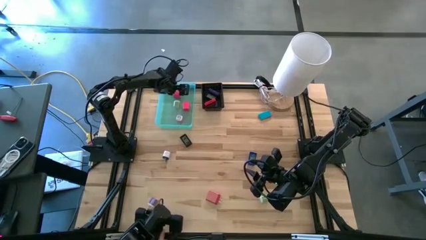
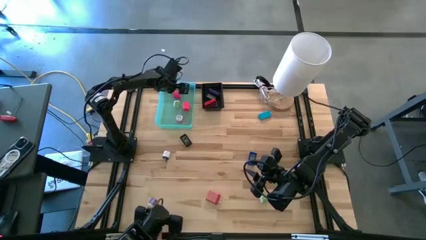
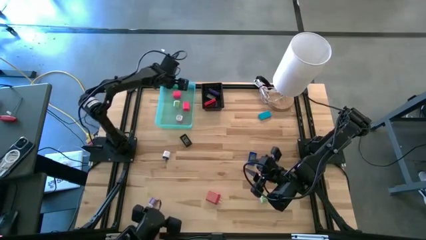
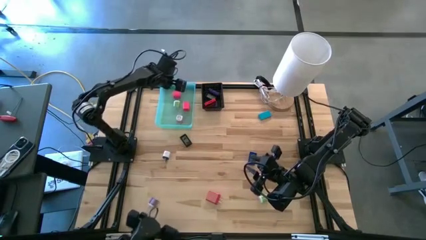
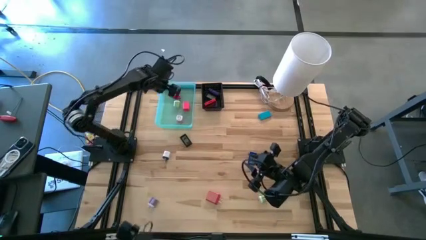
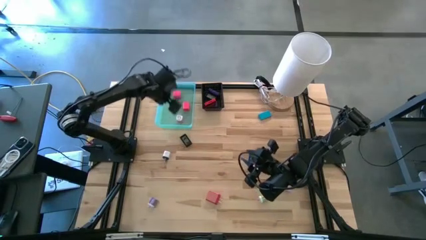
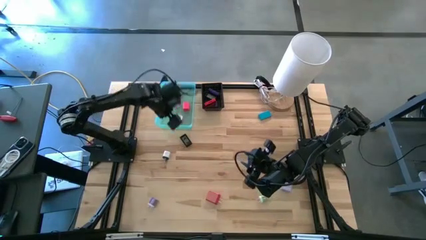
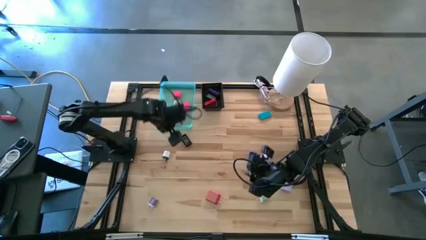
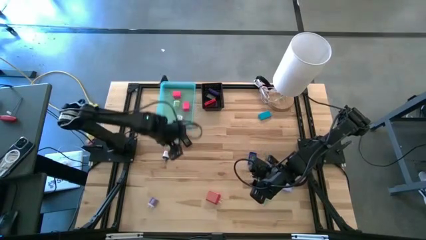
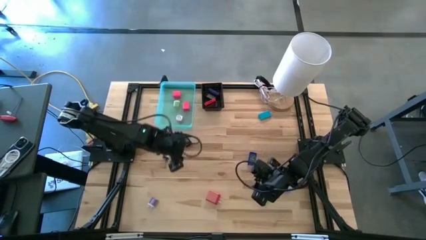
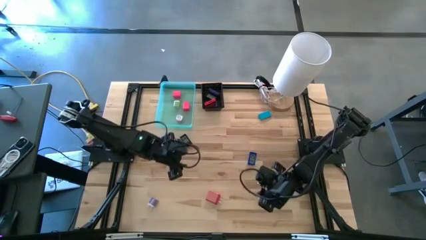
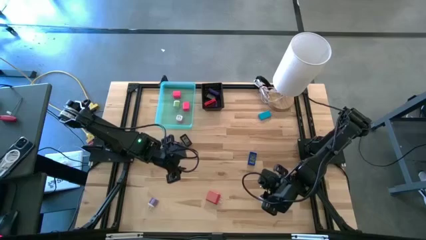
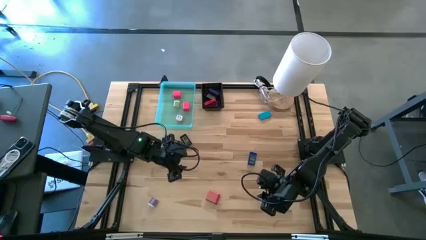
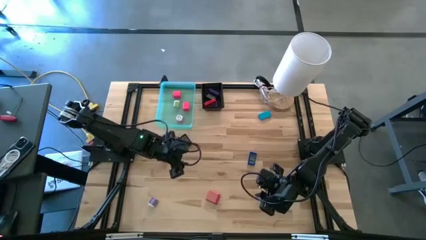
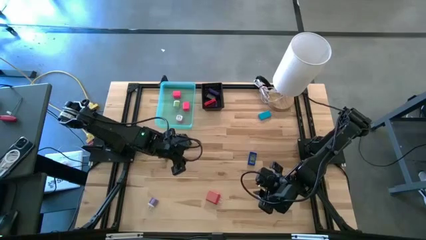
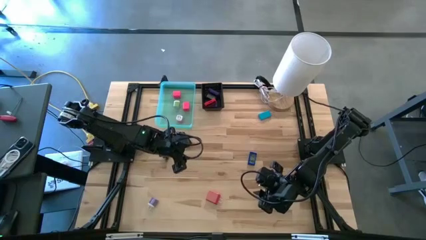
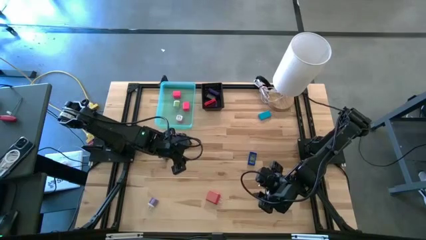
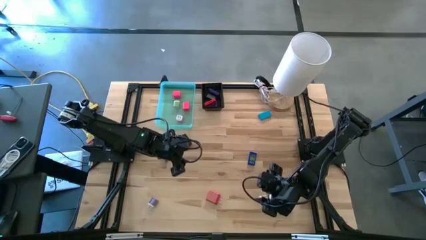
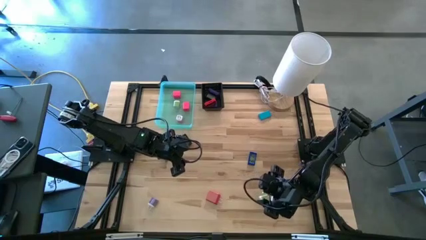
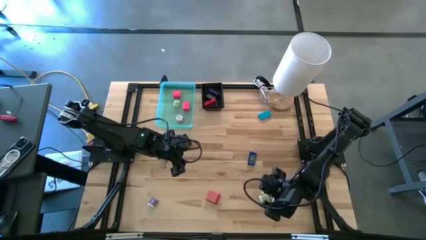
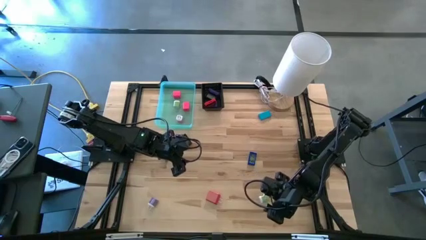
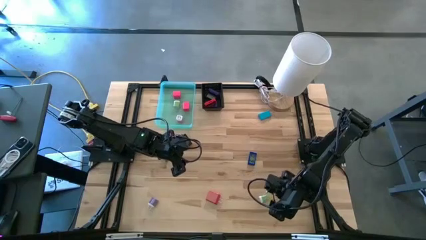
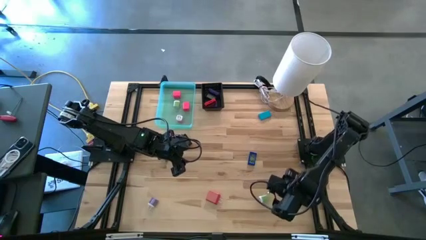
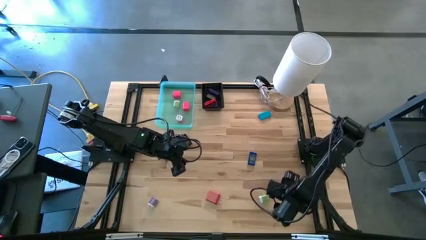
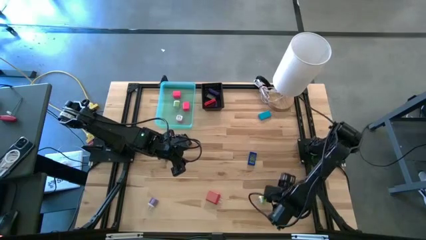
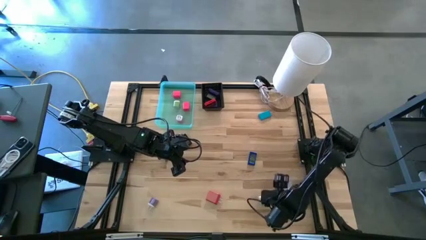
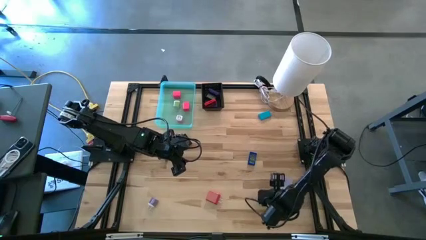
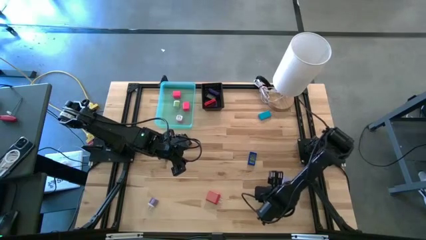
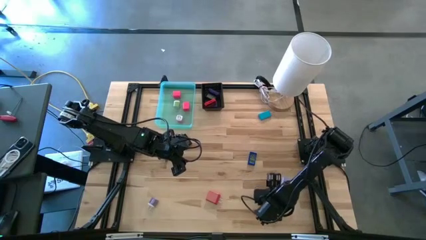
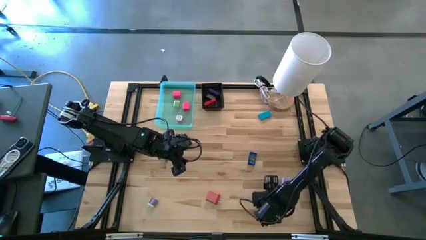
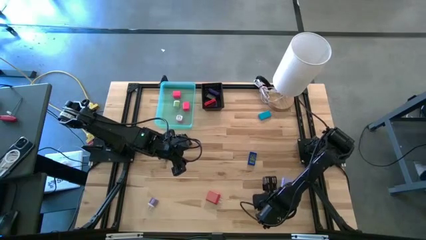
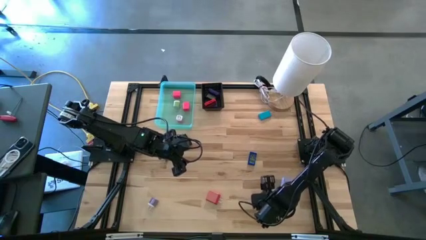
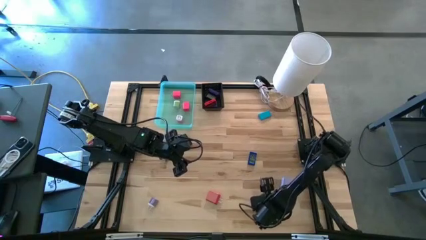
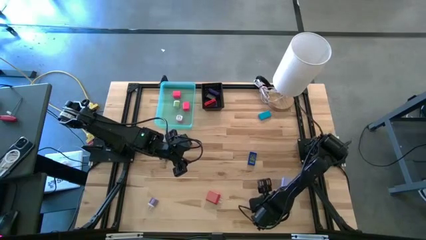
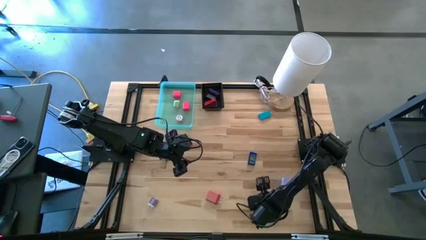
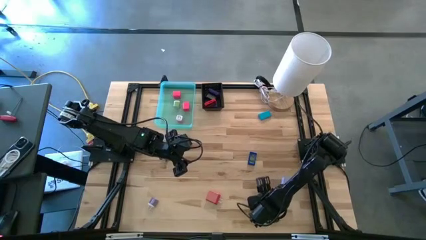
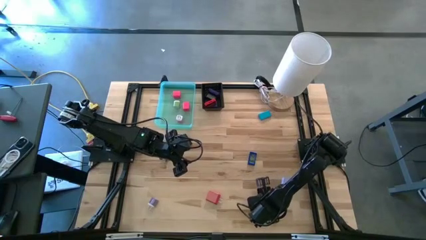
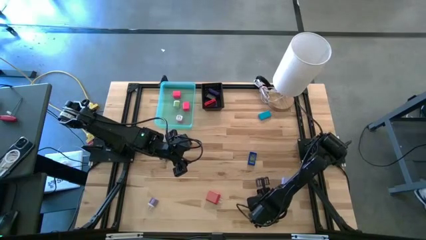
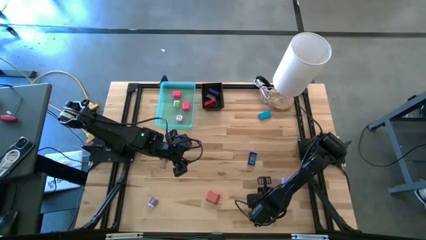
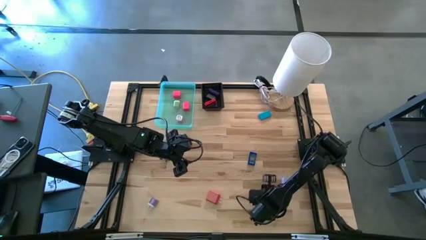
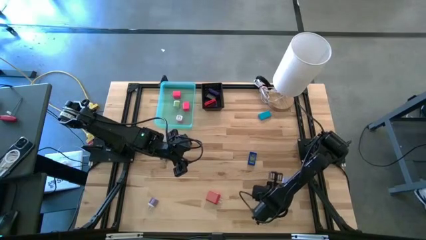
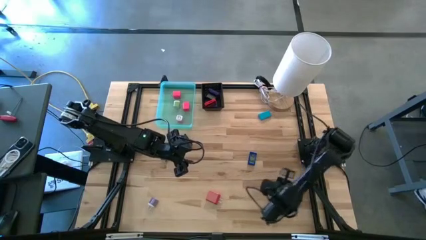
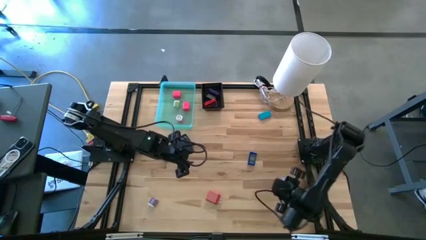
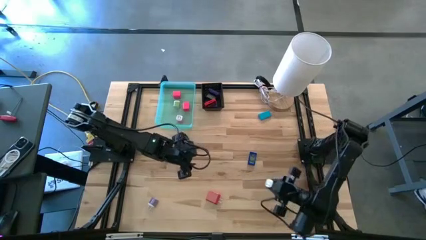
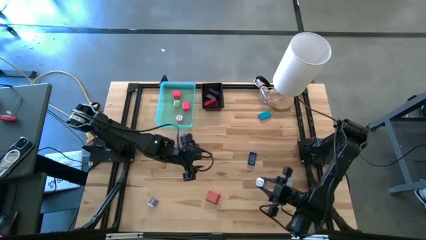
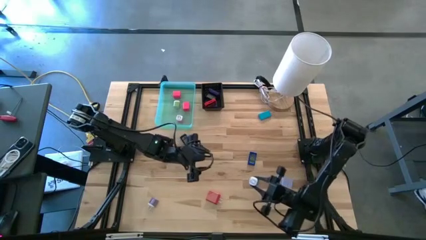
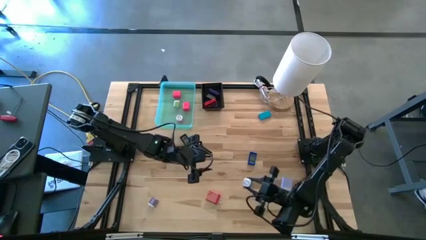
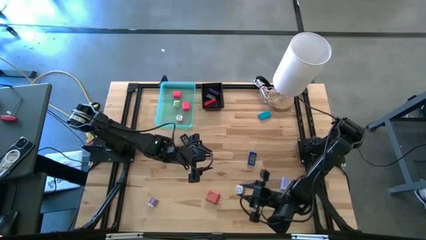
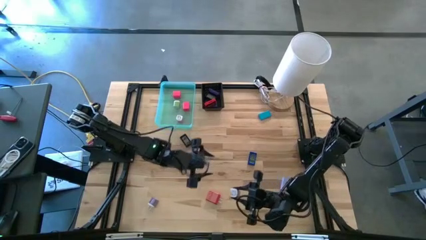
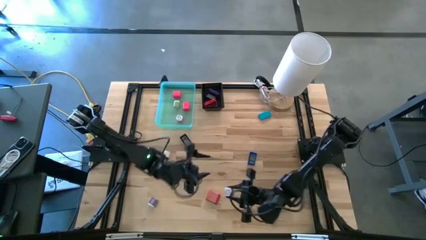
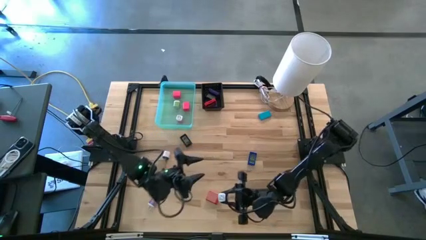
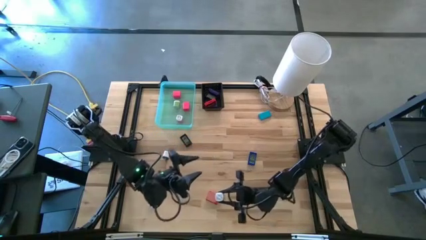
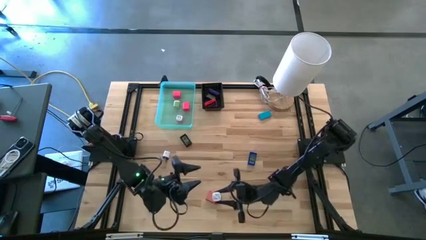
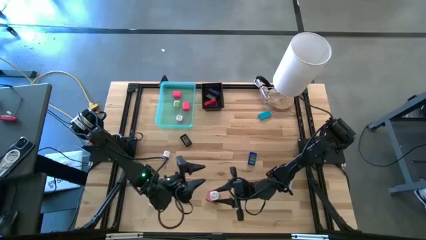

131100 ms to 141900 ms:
Task: Pick & Place Office items
Put the green charger adapter into the green bin

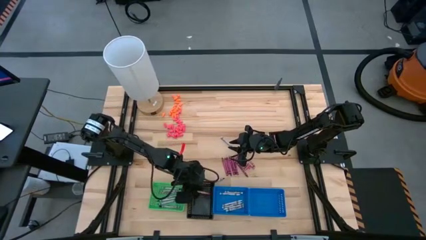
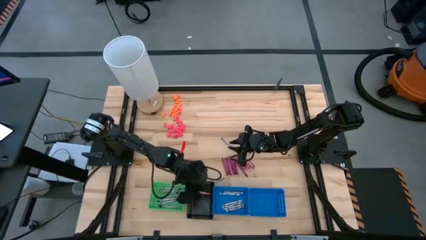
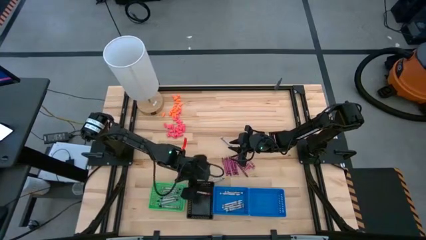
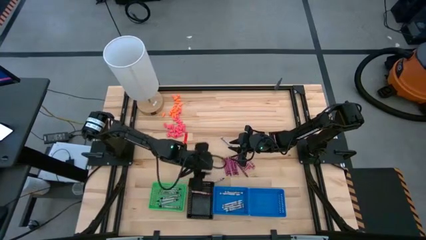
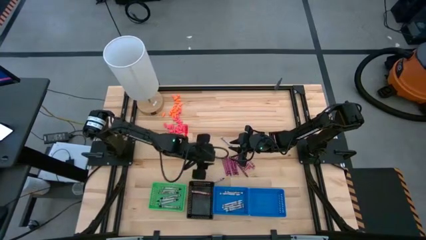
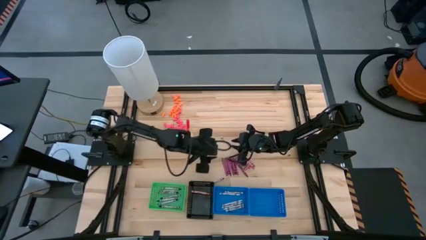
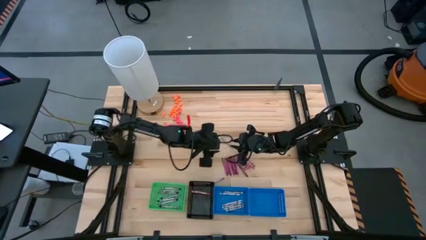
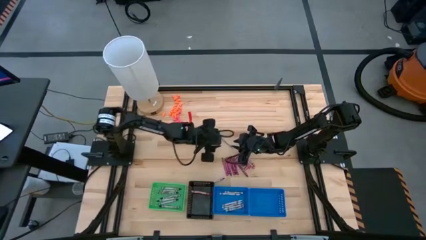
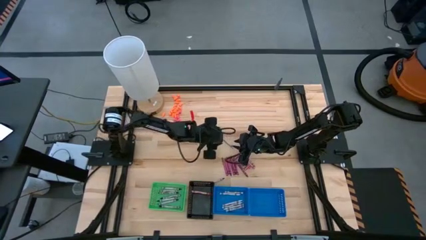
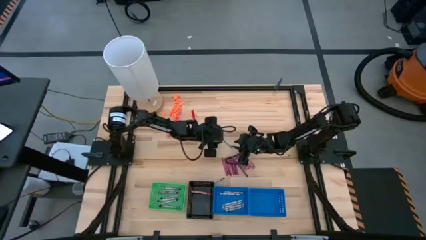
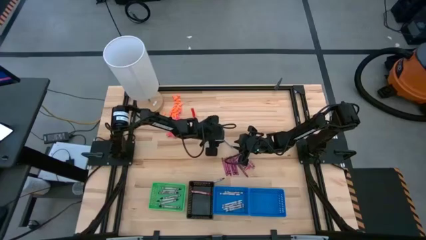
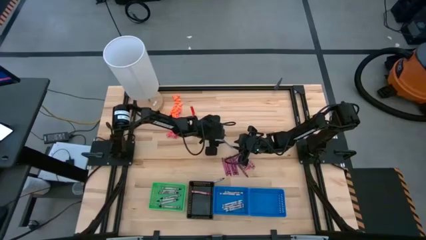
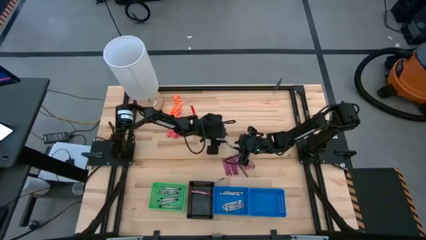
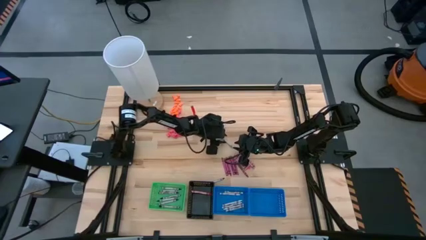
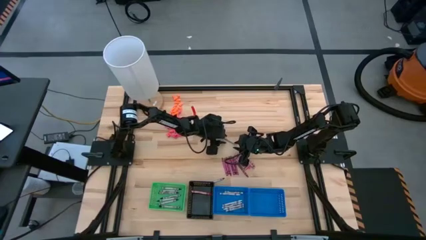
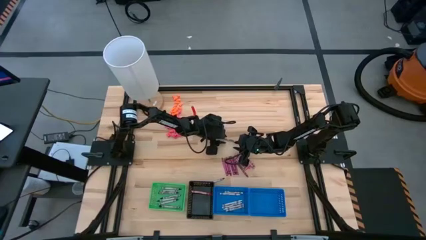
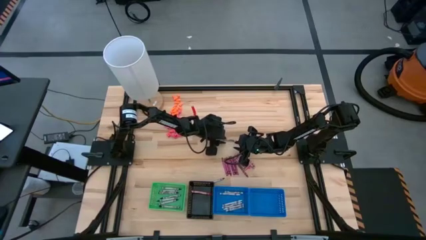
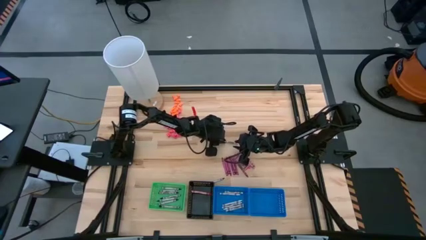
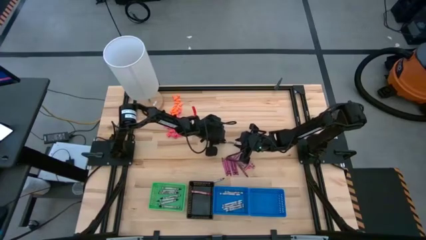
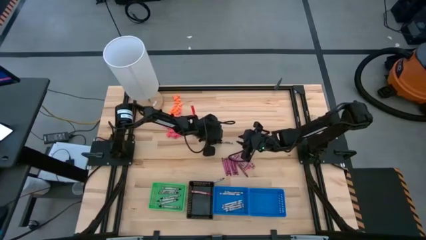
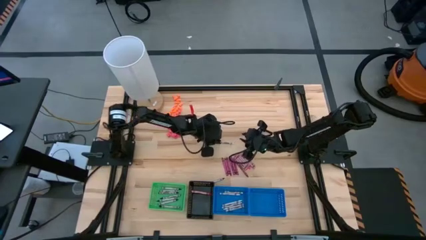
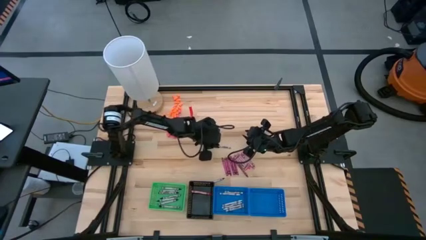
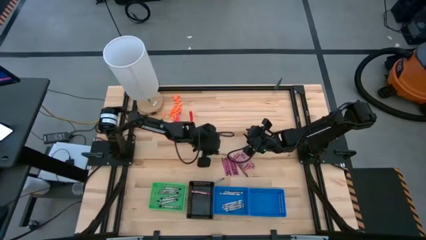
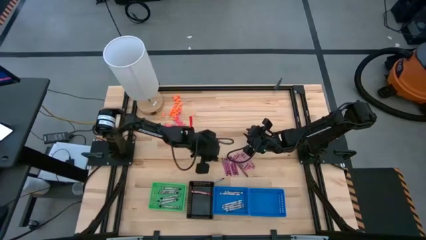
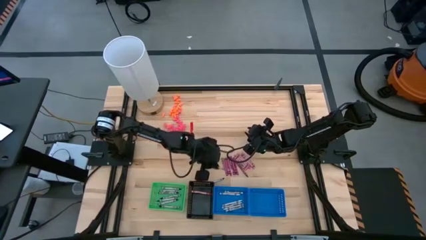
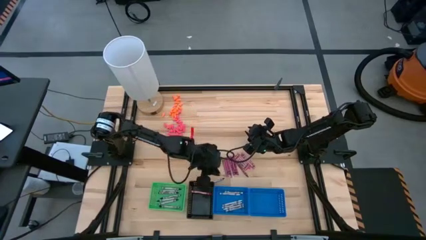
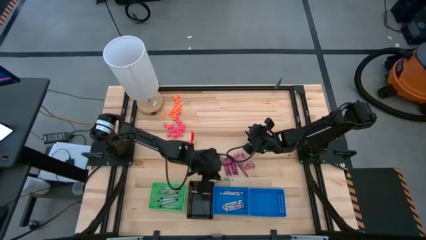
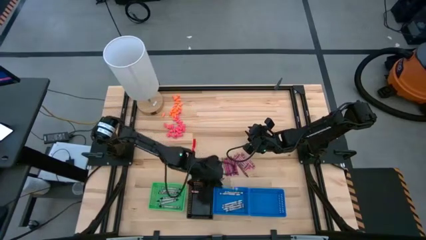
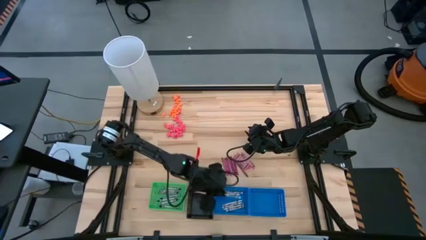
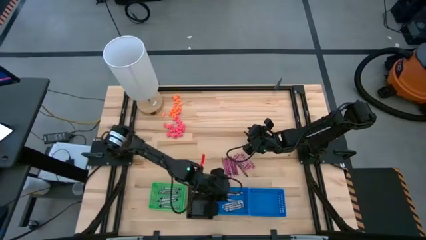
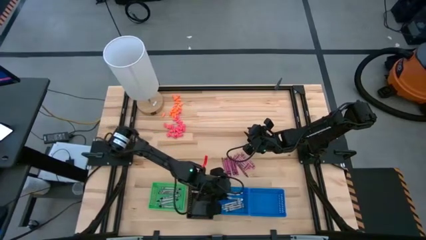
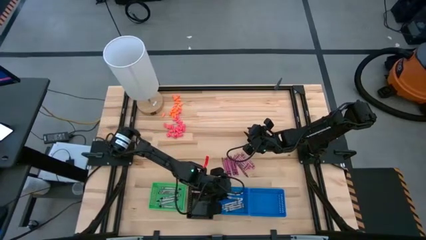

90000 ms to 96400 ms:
Task: Sort crayons
Put the white crayon into the left blue bin
